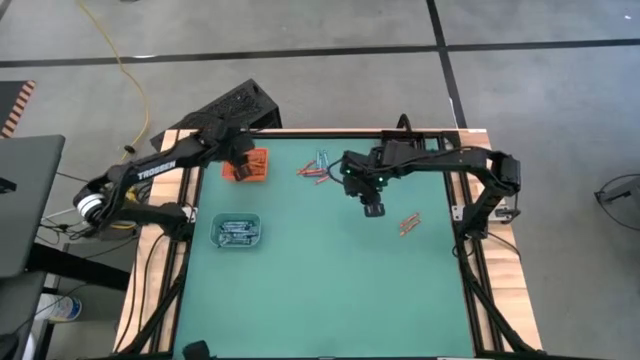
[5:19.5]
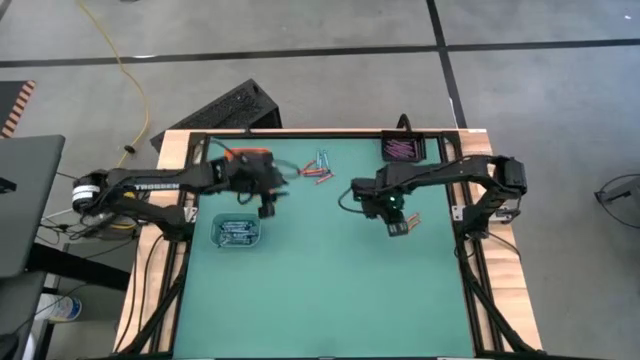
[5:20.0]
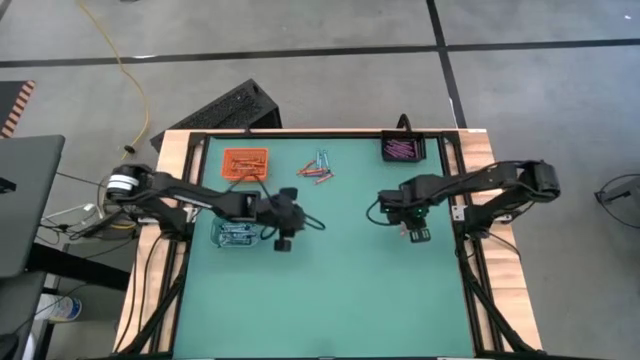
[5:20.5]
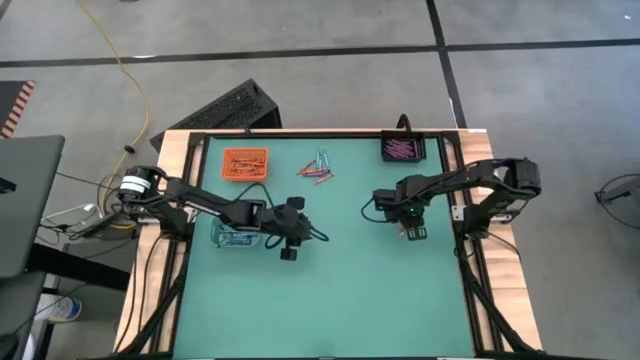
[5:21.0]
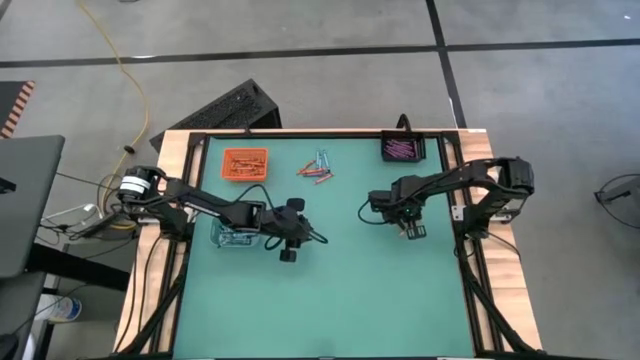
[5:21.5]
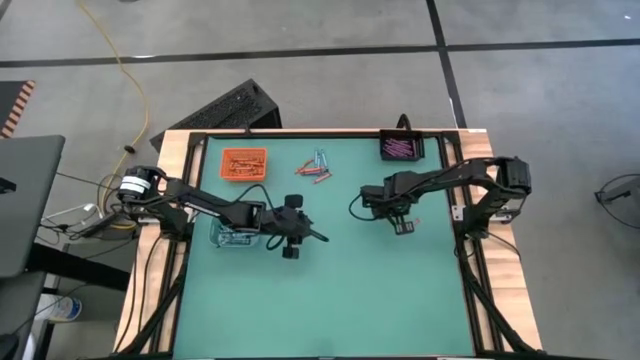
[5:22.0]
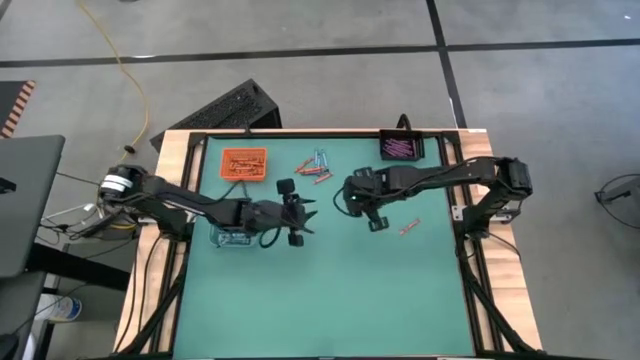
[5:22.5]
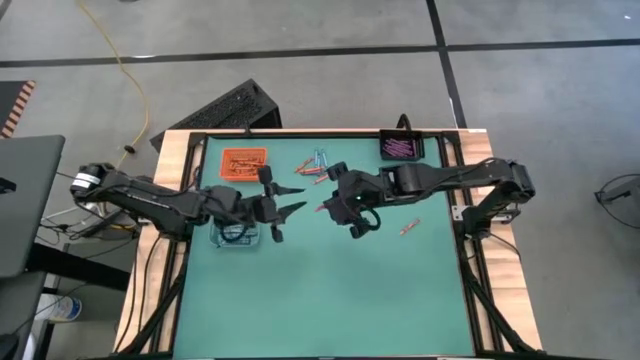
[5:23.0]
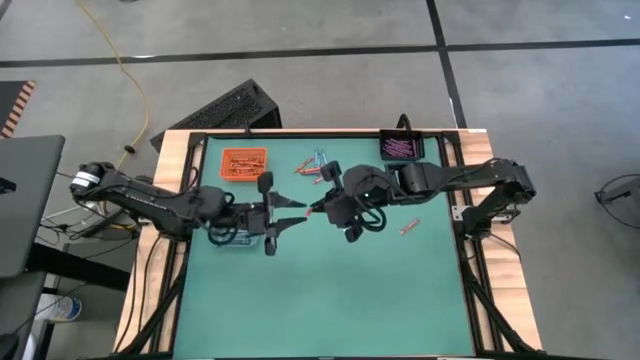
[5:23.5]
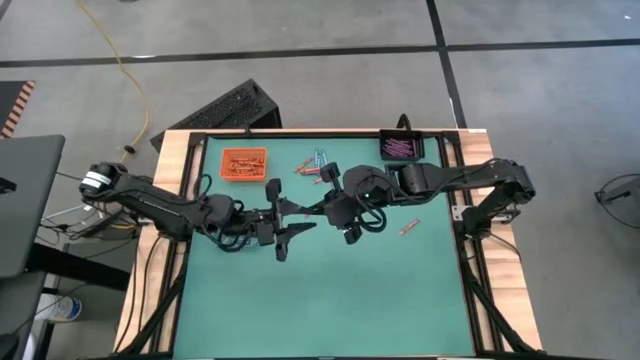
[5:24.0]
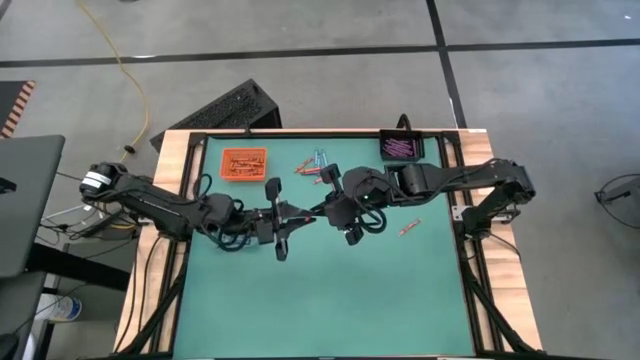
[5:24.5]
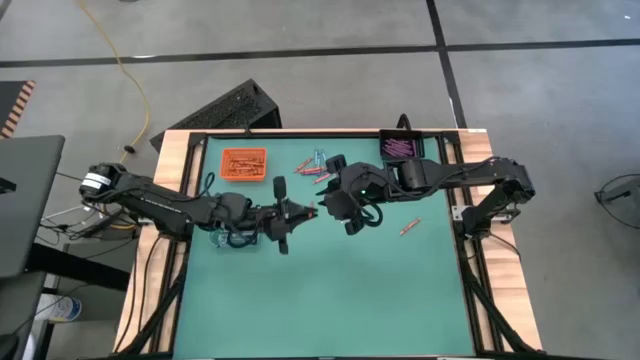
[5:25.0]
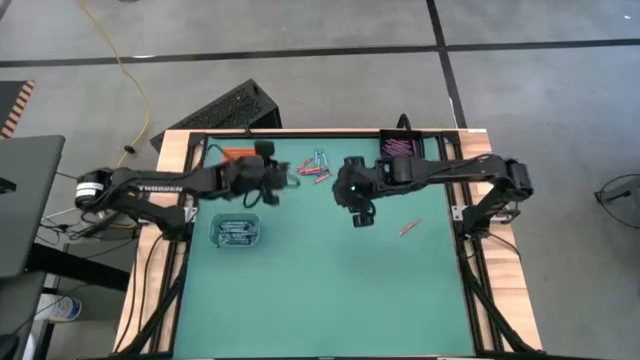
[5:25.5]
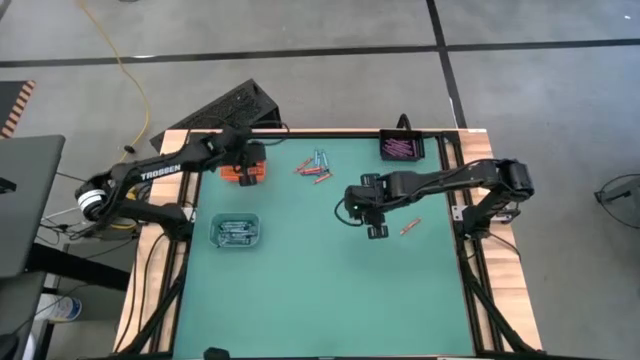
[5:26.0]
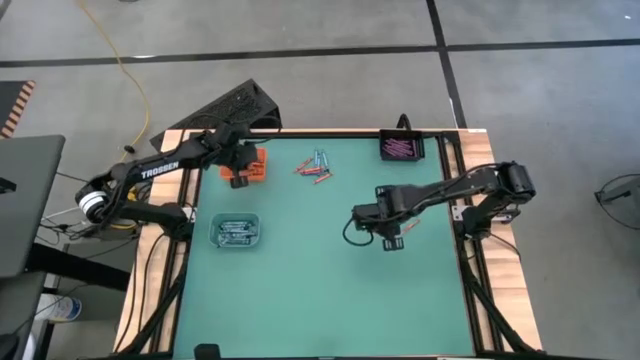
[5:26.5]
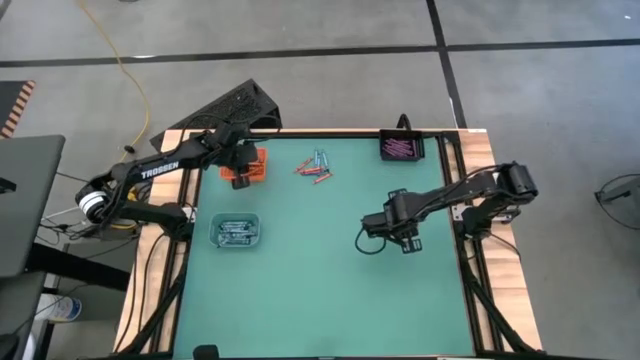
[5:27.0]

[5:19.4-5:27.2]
Task: Sort crayons
Put the right orange crayon into the top left orange bin

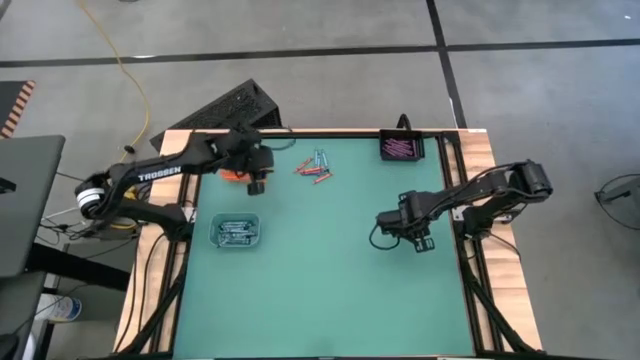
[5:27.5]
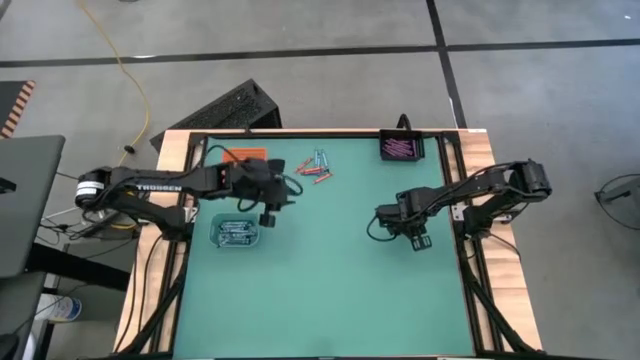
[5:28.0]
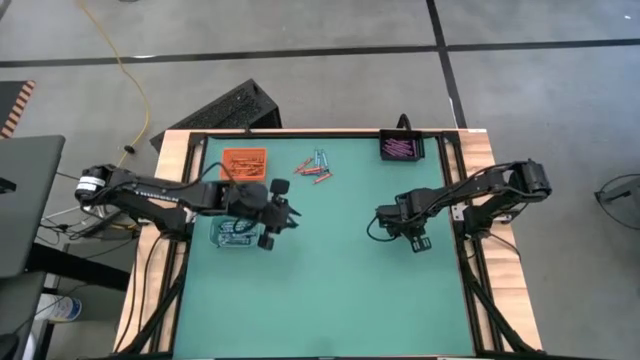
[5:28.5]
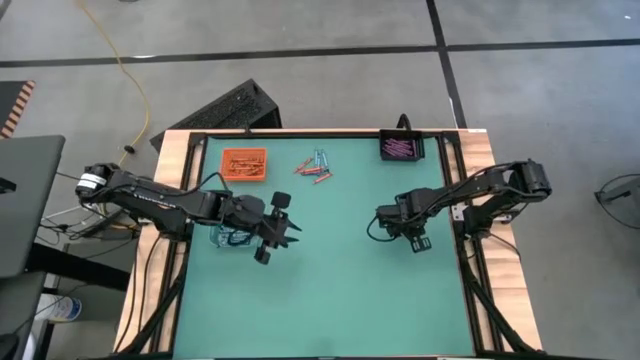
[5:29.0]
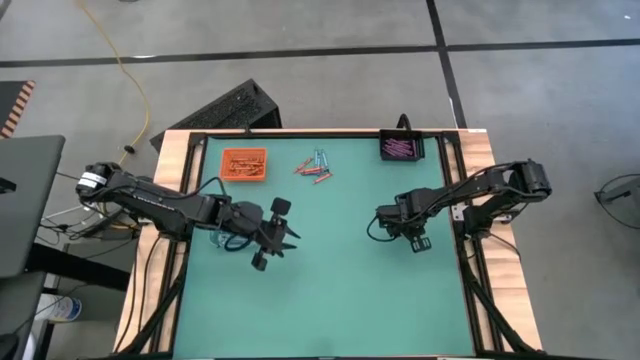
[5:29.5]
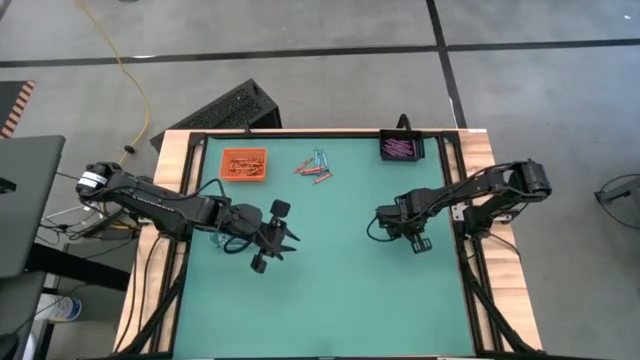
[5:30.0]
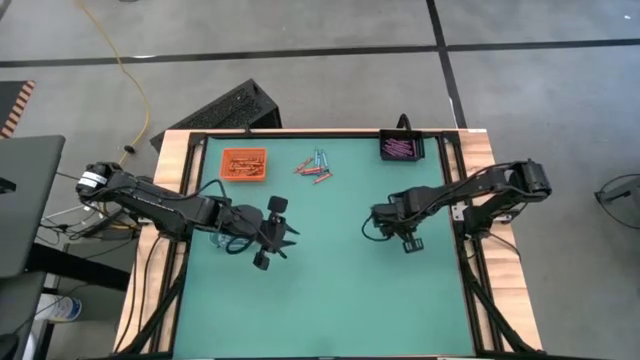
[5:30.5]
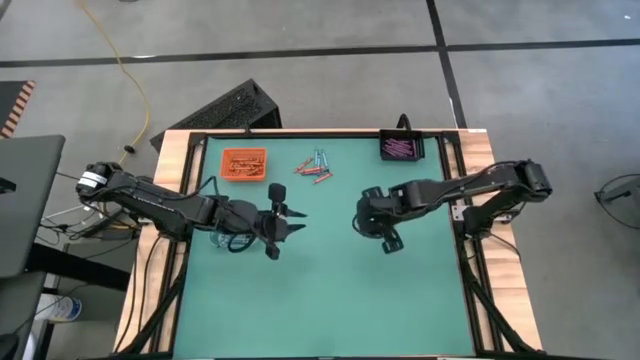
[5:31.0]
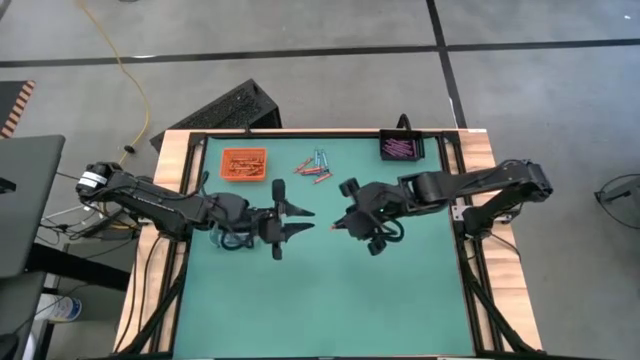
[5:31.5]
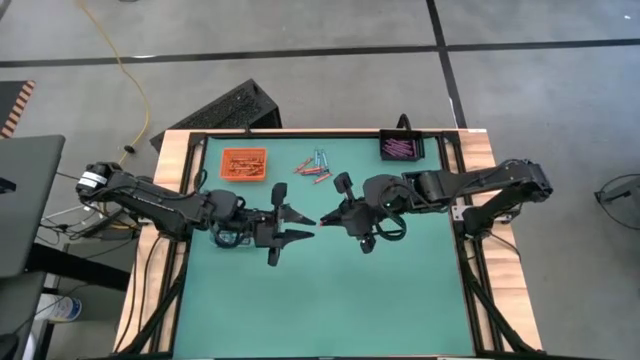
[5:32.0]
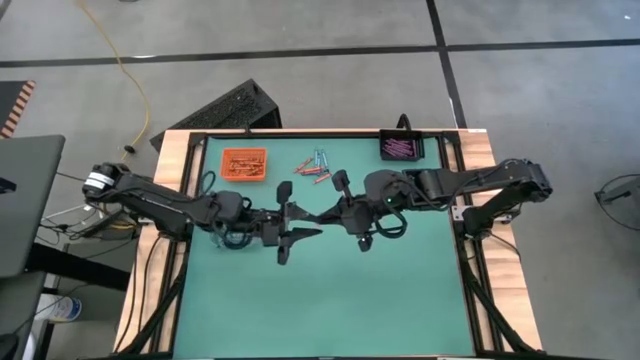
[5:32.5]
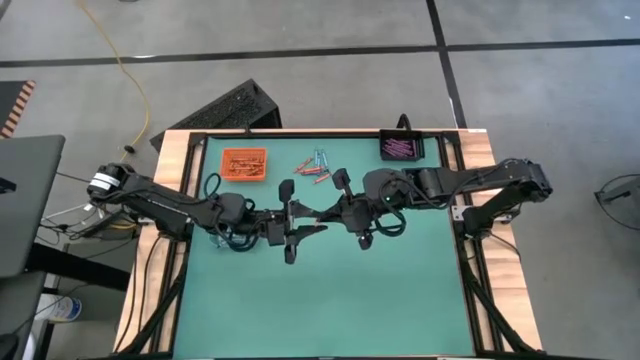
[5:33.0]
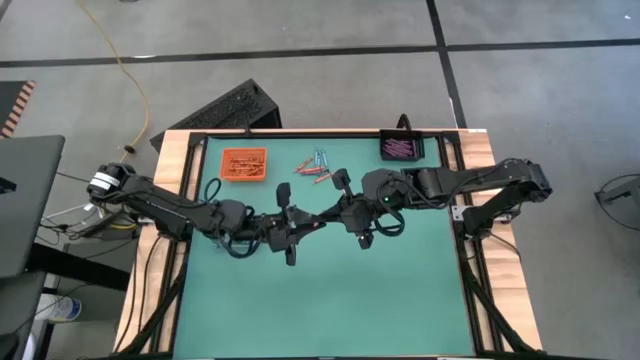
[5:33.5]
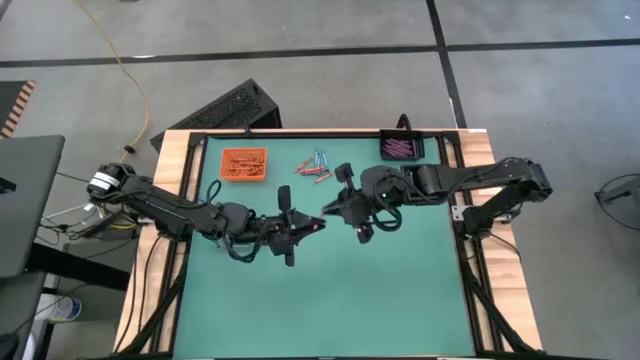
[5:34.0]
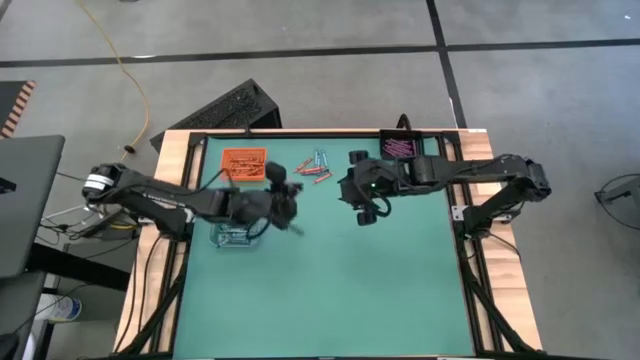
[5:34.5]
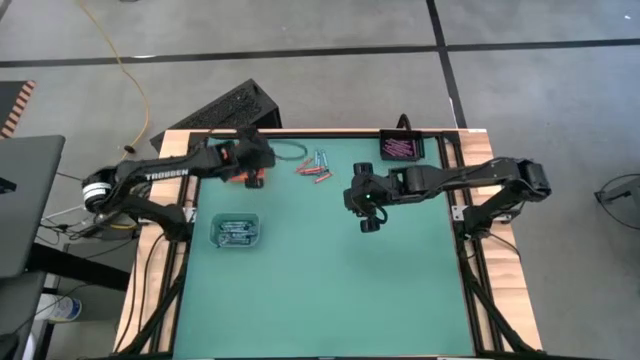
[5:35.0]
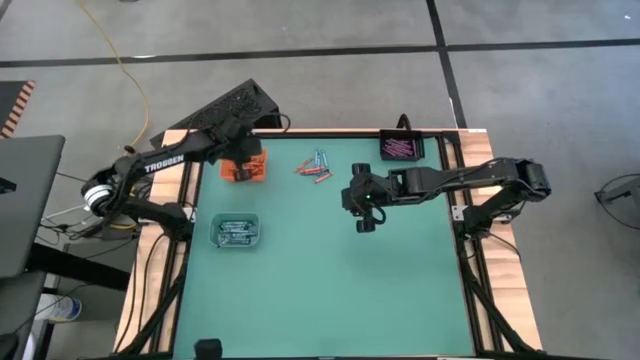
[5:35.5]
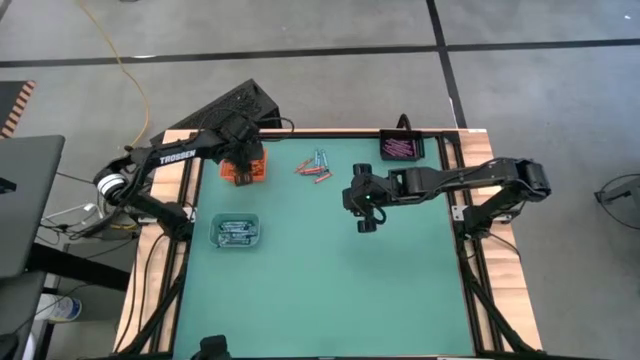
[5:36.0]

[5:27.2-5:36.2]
Put the right orange crayon into the top left orange bin

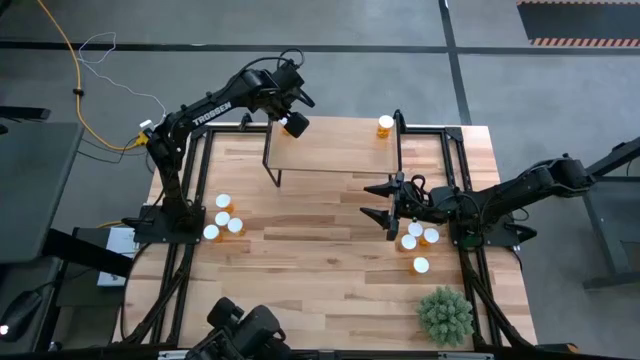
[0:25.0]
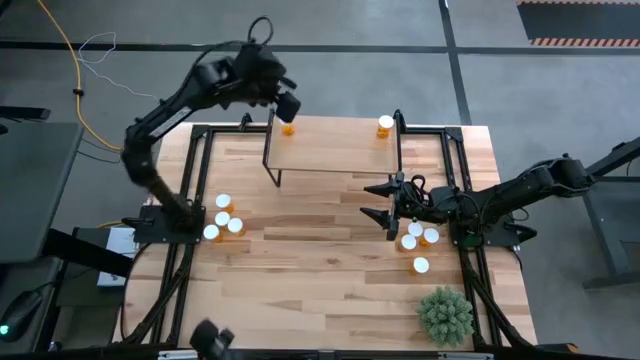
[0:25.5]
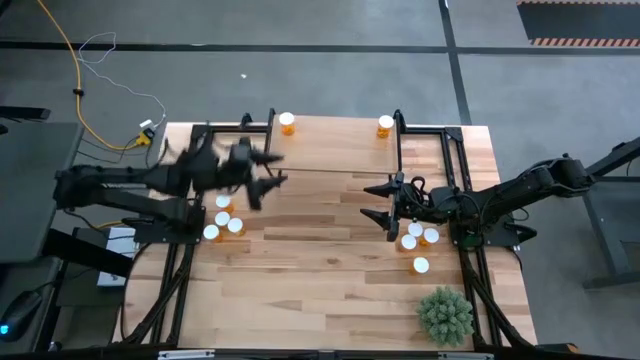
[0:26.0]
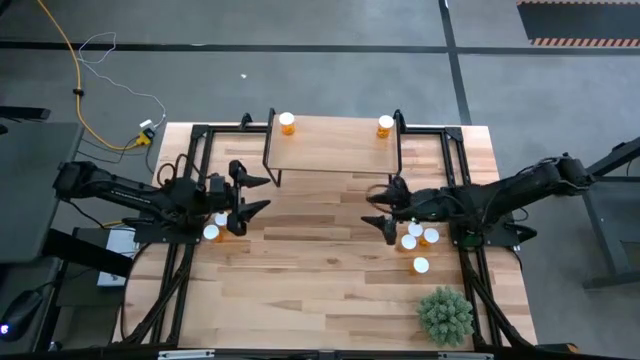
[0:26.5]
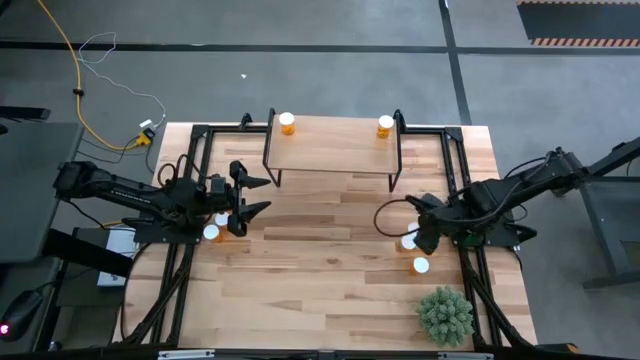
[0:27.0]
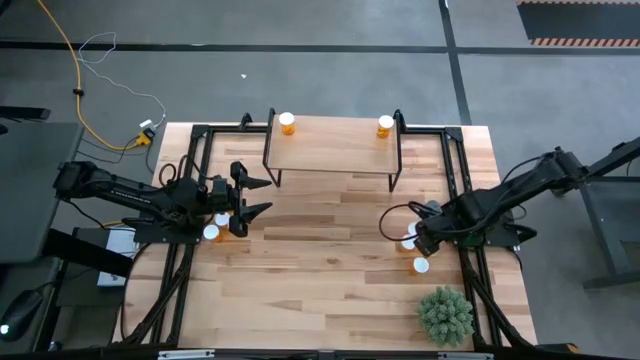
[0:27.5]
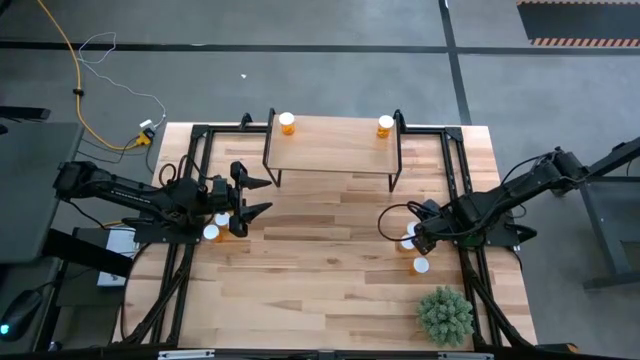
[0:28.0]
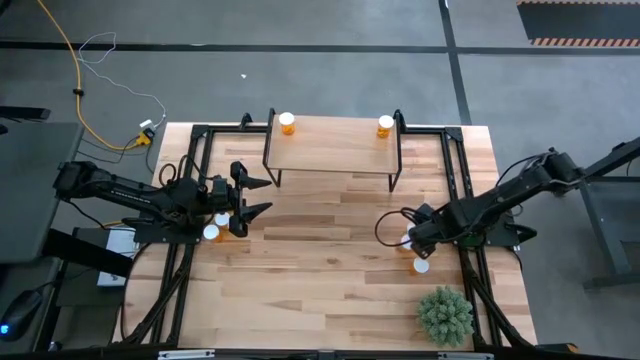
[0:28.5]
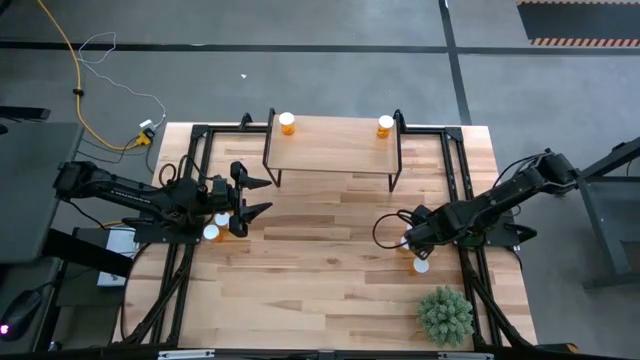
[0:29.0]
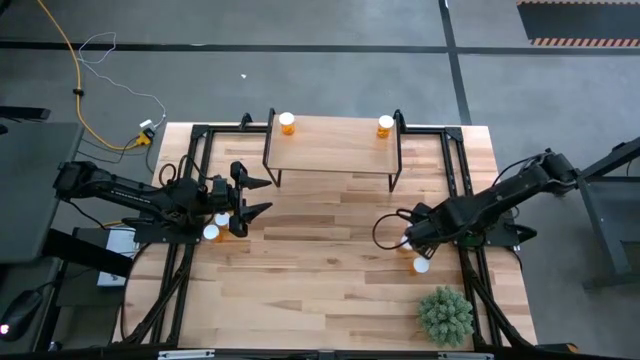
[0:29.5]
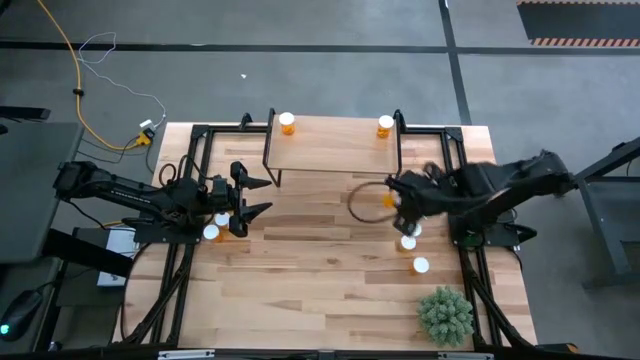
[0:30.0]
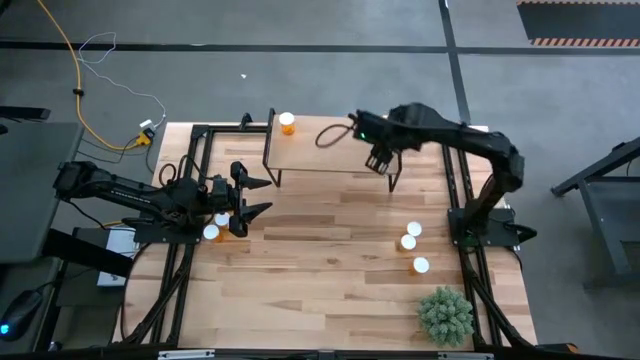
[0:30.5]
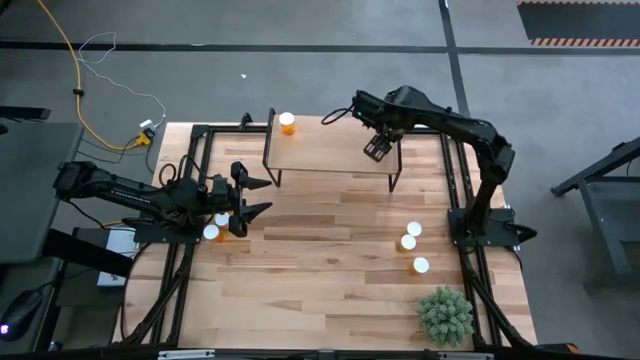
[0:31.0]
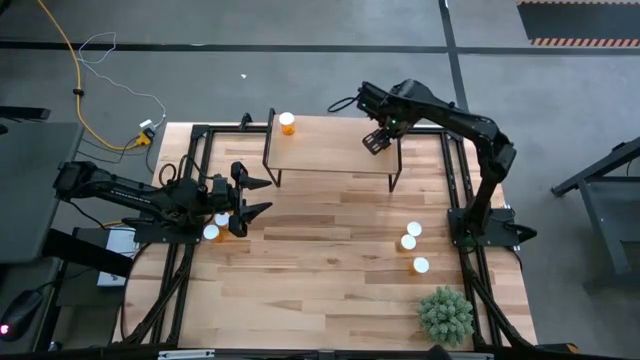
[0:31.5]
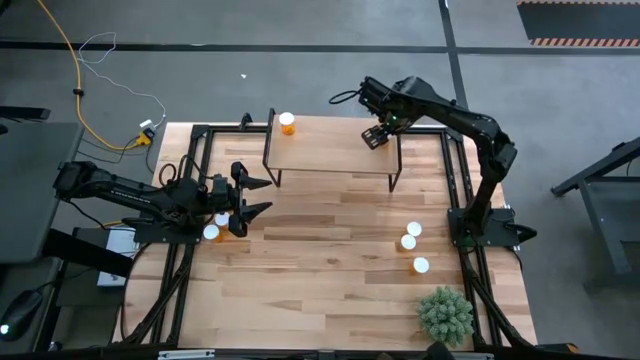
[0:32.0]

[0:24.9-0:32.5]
Task: Pick and place medicine bottles onto shelf by color
Put the yellow pill bottle on the shelf
